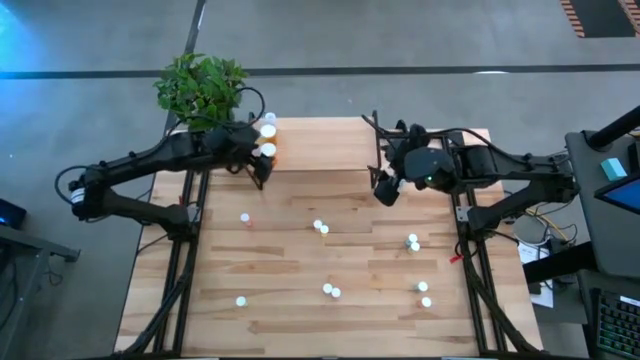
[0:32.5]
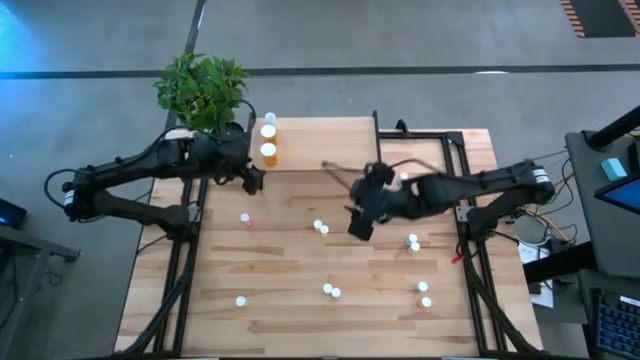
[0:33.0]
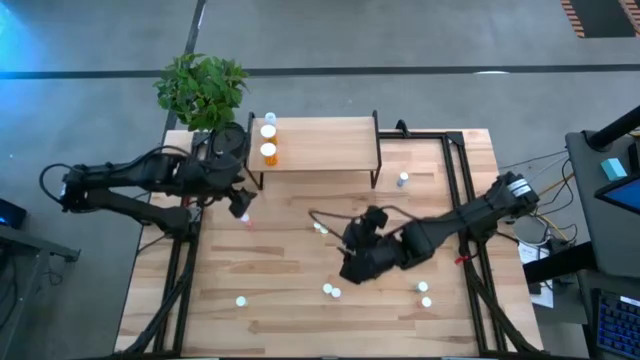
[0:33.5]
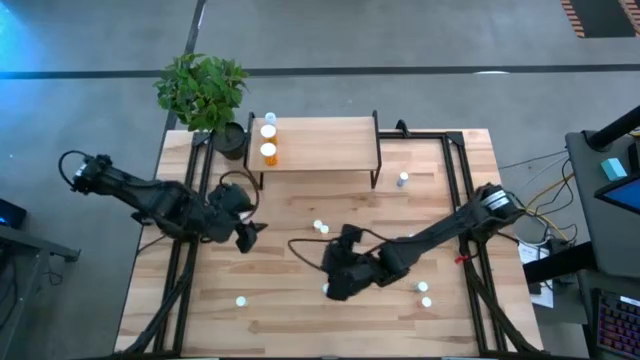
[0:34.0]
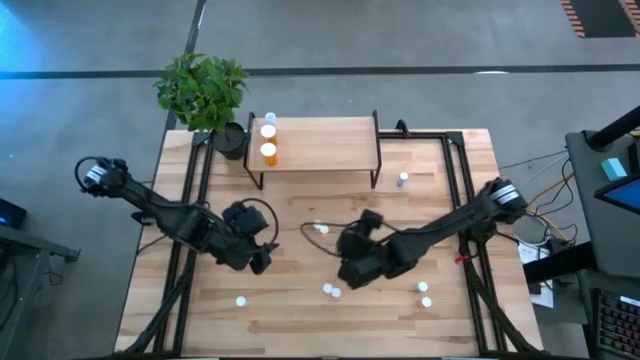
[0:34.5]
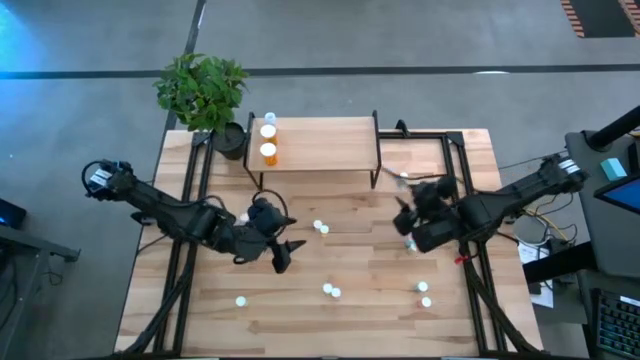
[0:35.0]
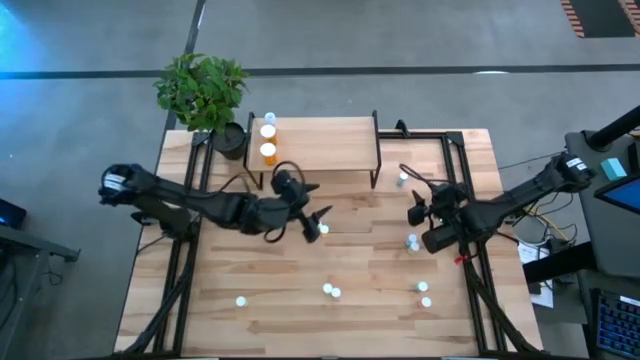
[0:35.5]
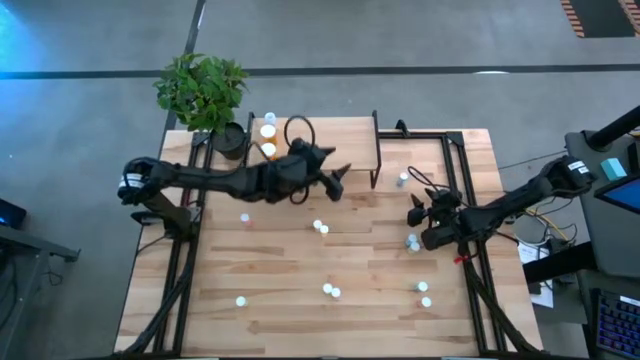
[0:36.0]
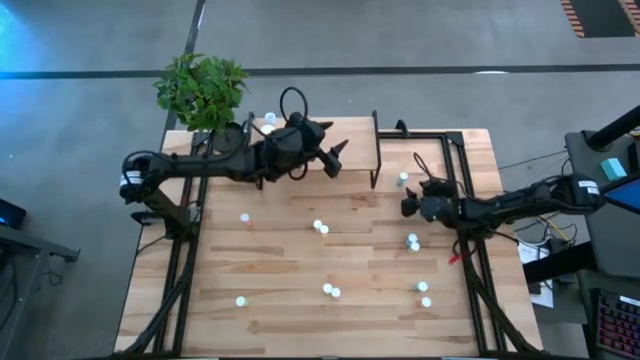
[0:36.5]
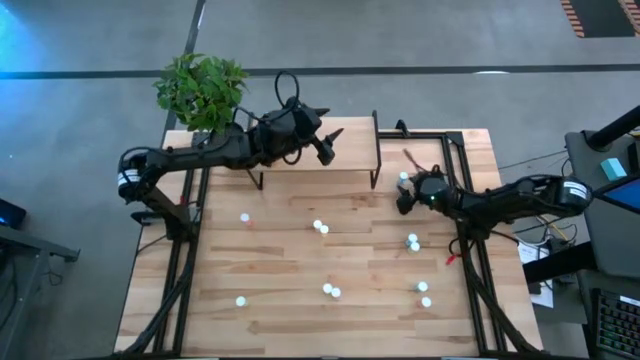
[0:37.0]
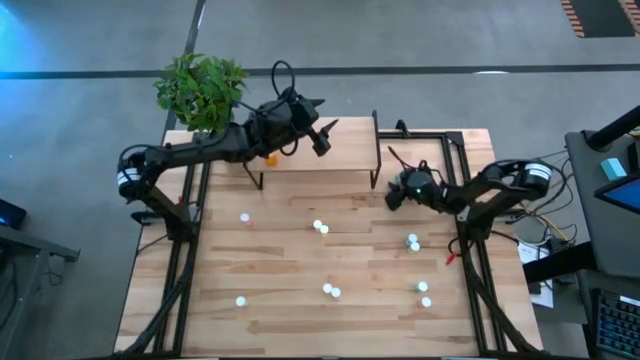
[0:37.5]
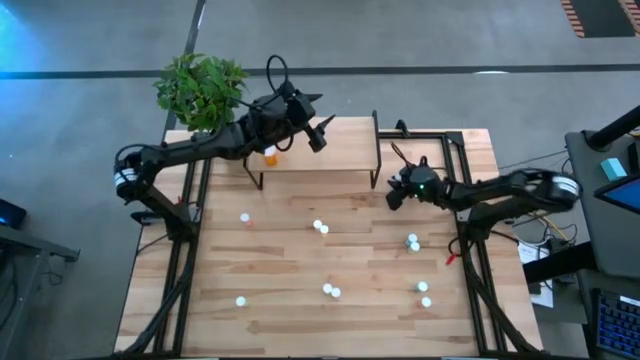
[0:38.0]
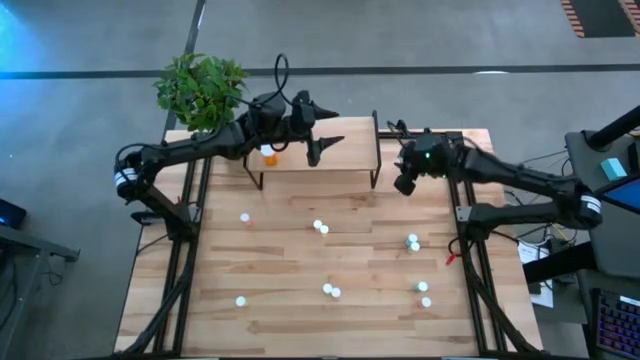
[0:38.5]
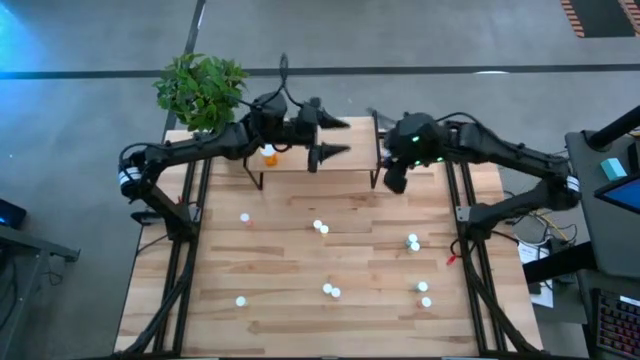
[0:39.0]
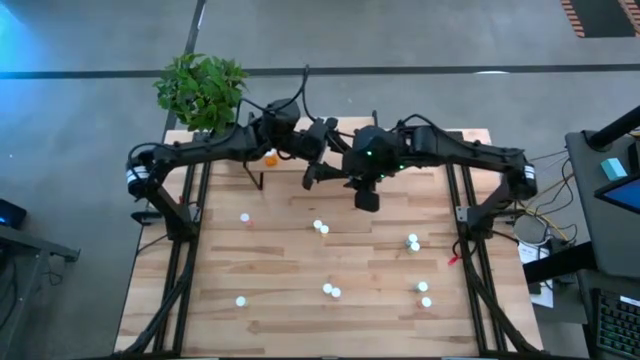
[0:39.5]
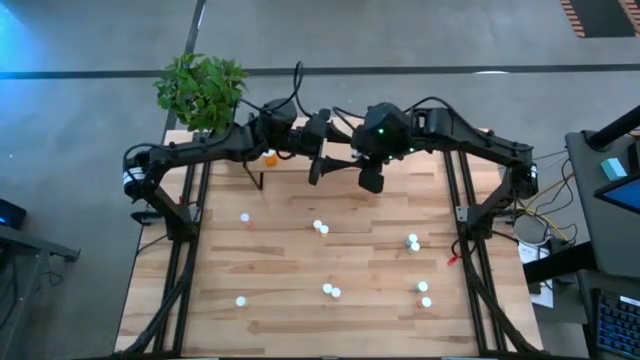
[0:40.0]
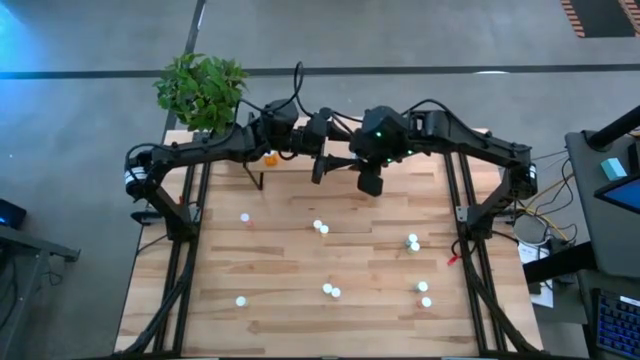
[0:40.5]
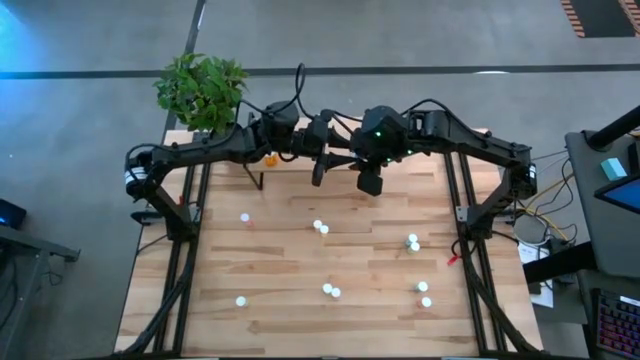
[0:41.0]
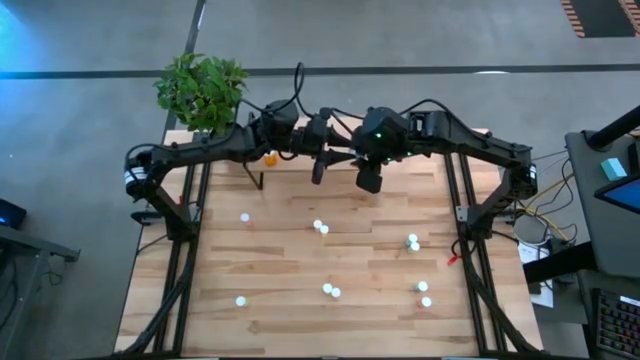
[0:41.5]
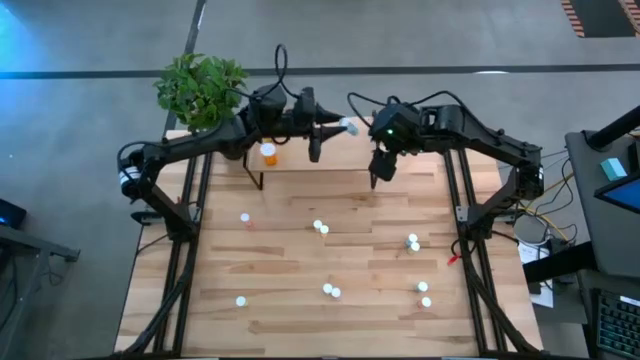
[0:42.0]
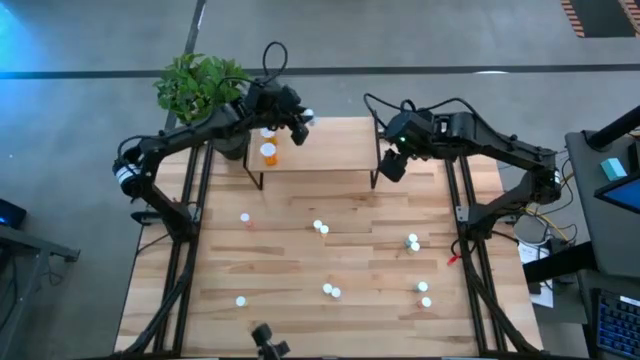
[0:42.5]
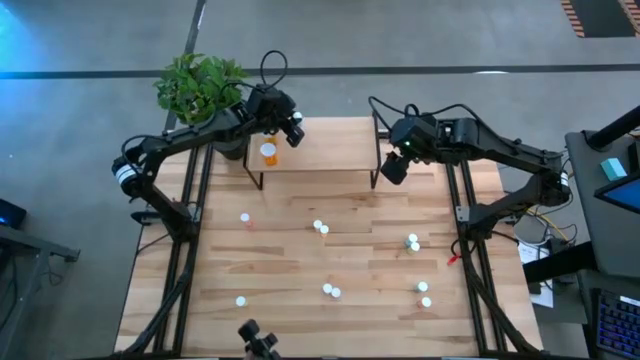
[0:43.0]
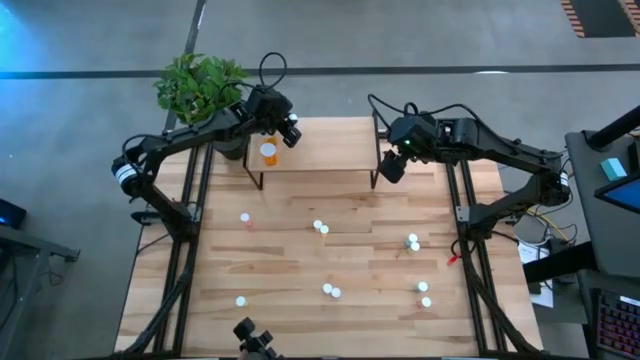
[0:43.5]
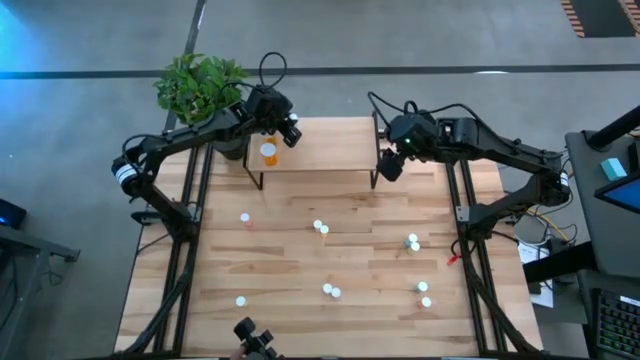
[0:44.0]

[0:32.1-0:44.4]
Task: Pick and place medicine bottles onto shelf by color
Put the blue pill bottle on the shelf

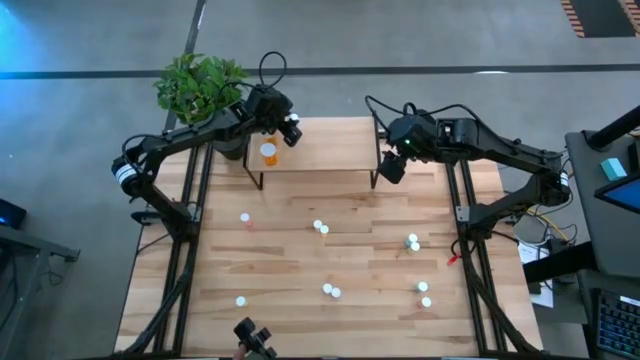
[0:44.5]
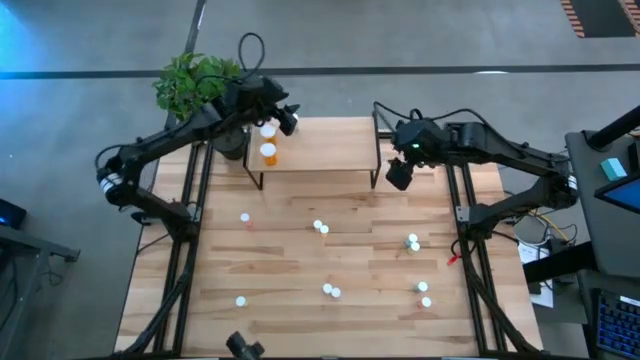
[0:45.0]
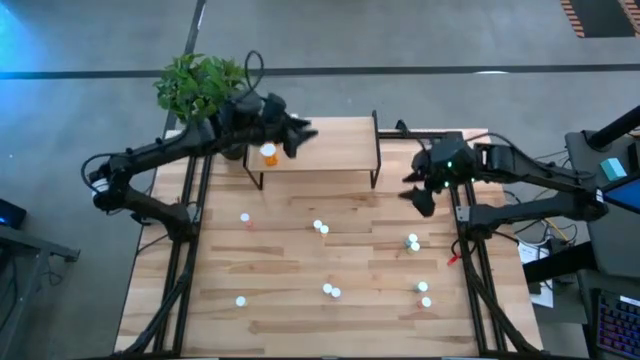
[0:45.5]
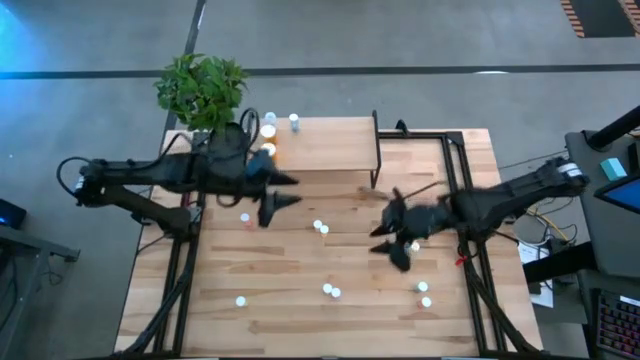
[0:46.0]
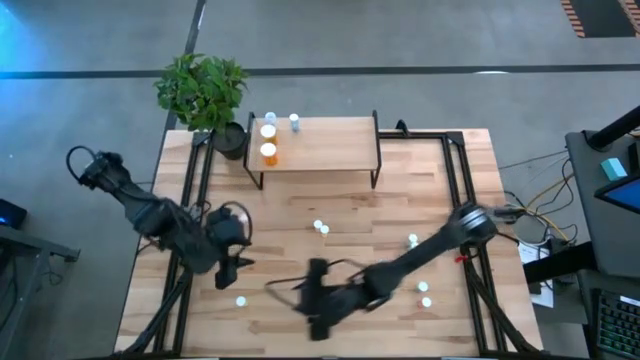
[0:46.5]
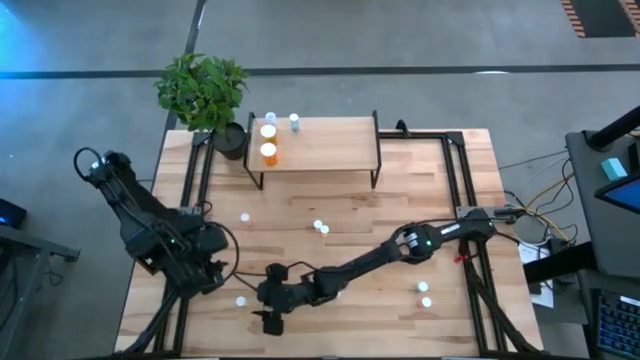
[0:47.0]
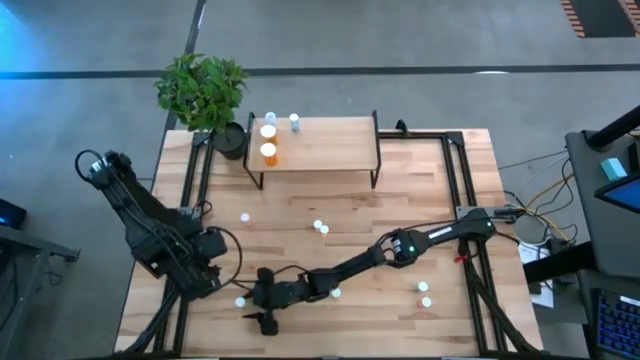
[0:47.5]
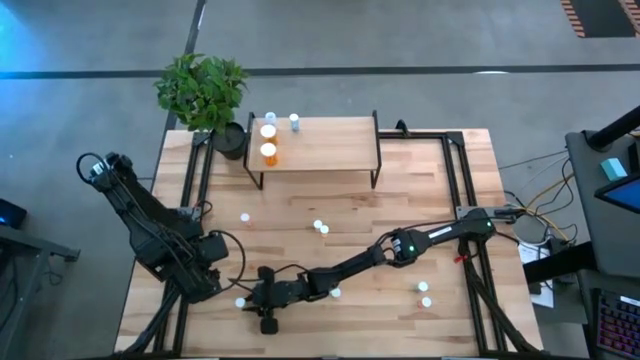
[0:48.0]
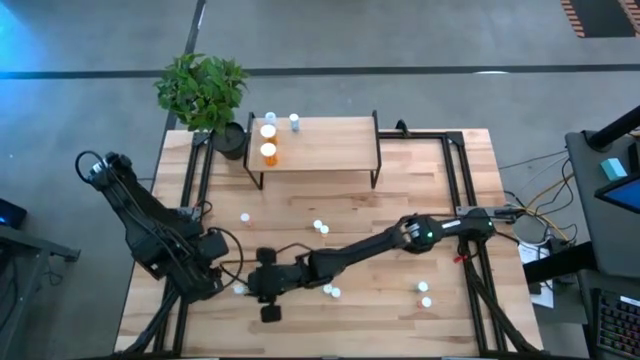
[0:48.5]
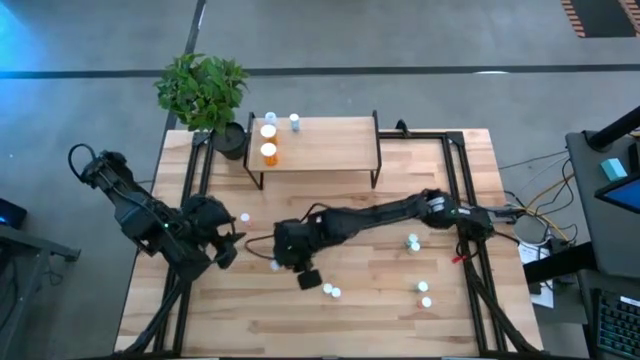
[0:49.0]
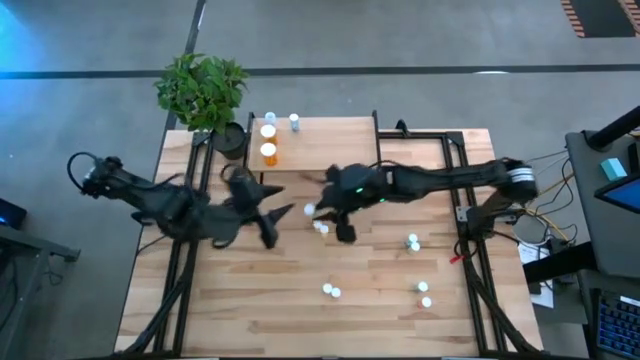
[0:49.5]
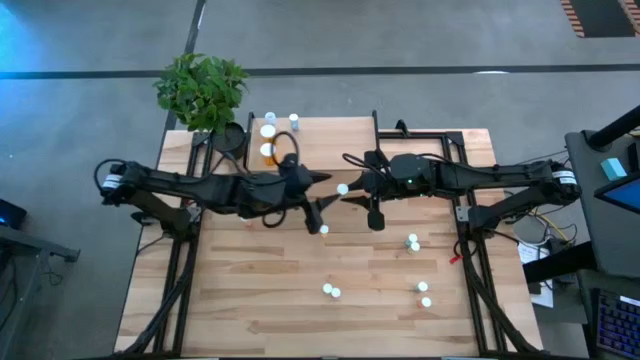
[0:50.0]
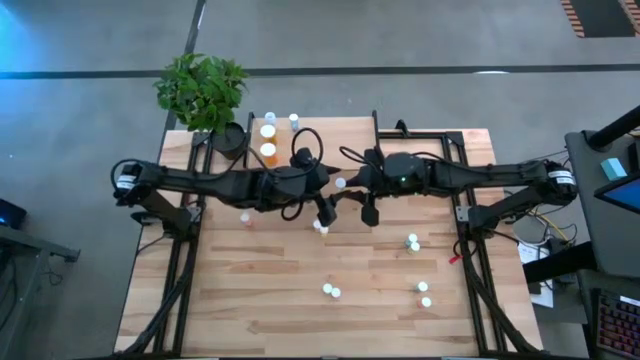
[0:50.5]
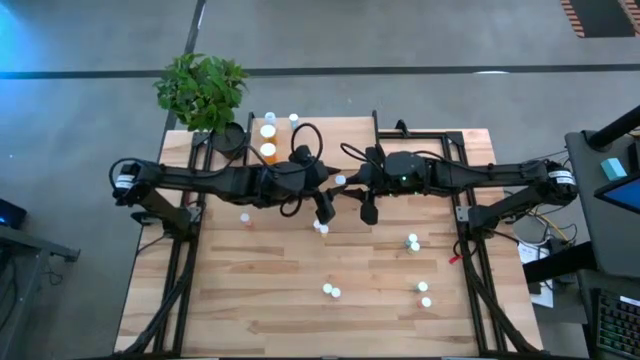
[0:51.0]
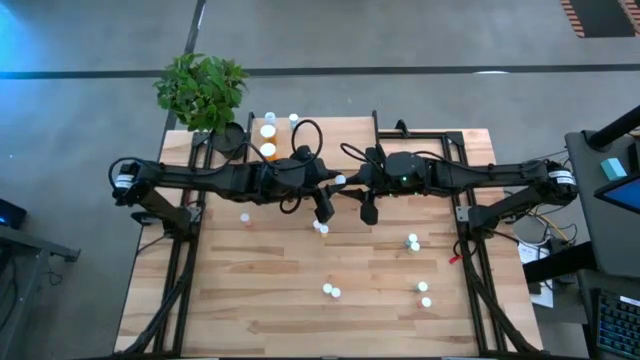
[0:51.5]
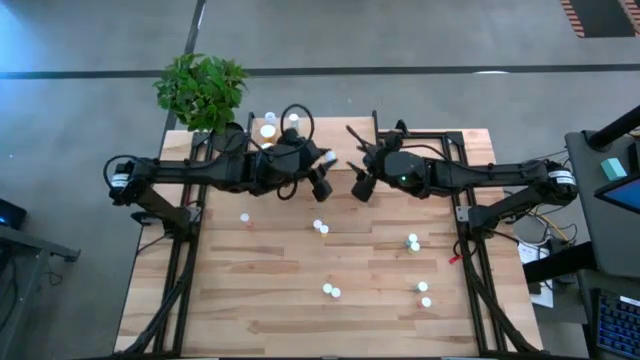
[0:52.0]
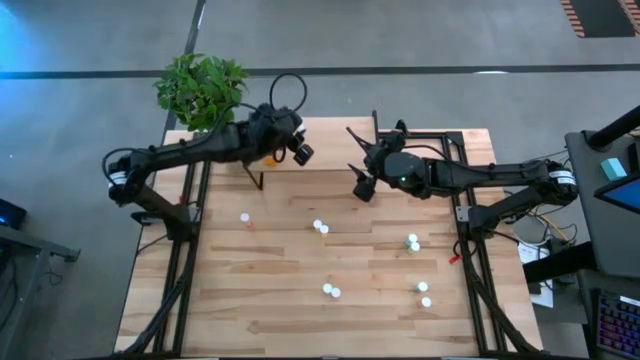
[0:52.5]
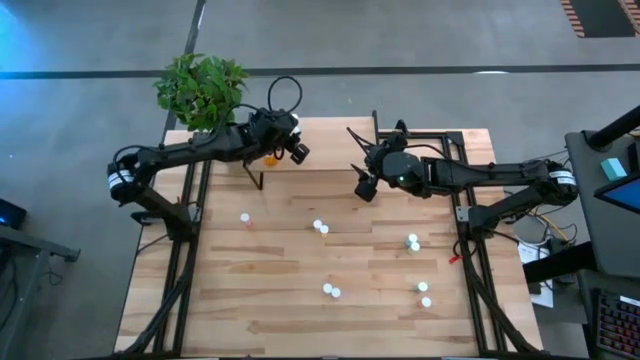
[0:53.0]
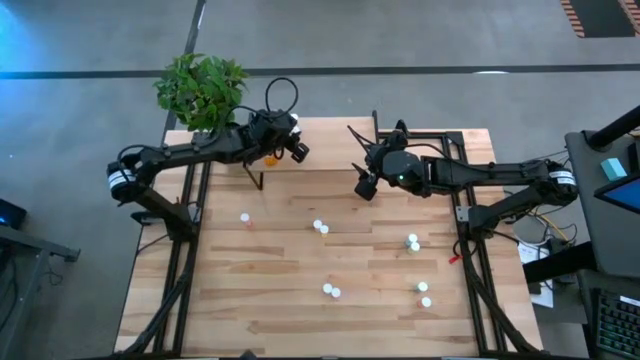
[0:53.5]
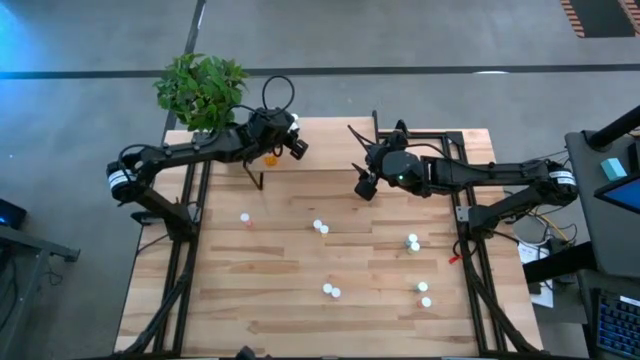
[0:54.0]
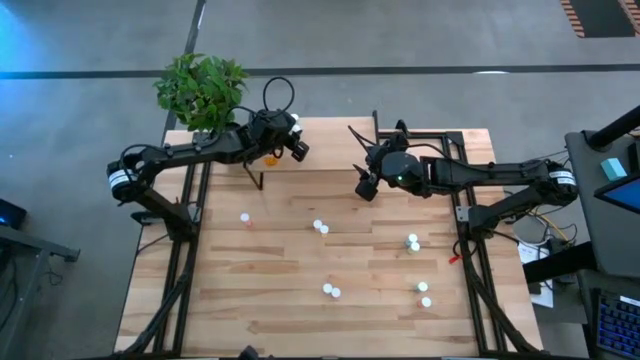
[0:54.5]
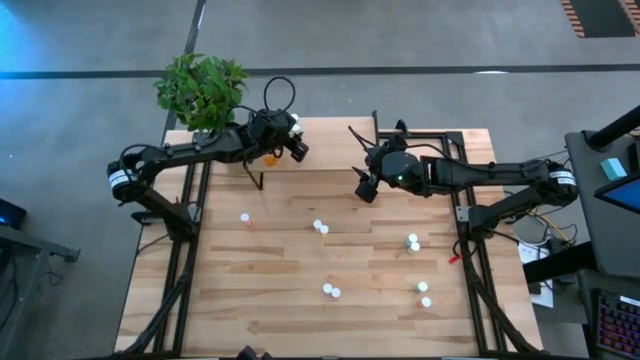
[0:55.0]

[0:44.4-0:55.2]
Put the yellow pill bottle on the shelf
